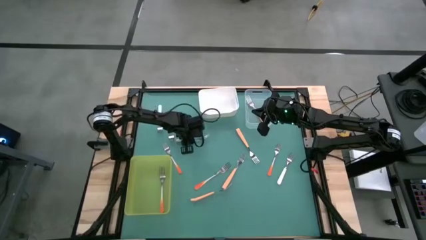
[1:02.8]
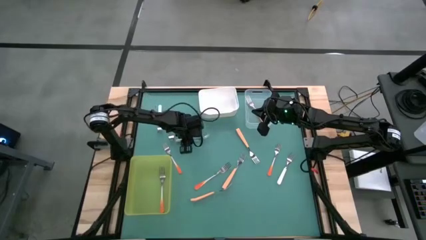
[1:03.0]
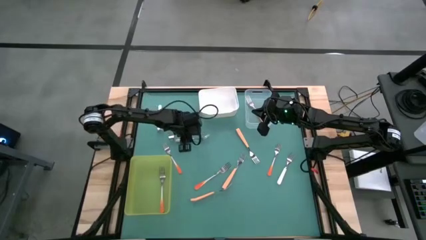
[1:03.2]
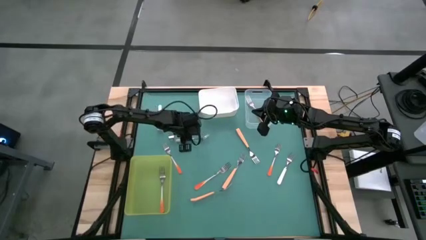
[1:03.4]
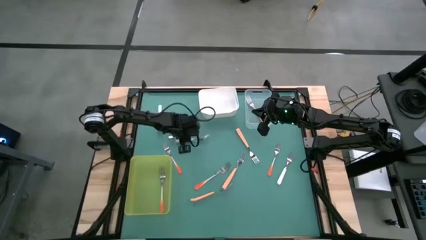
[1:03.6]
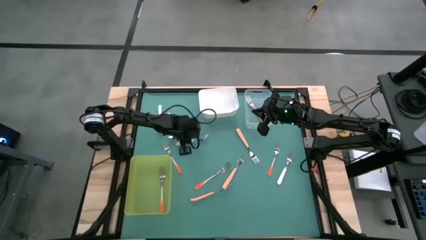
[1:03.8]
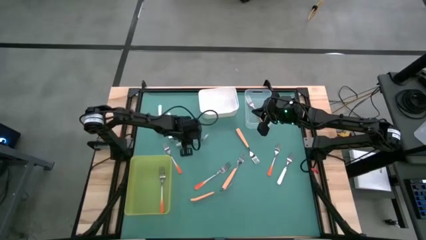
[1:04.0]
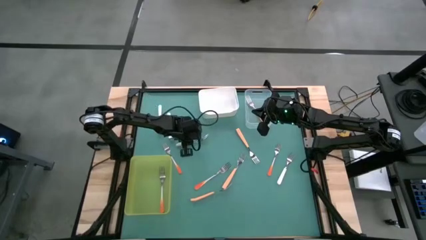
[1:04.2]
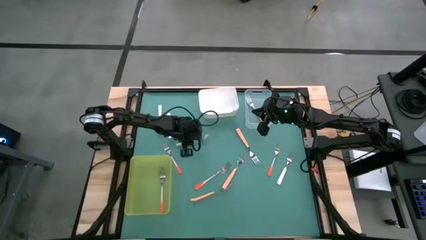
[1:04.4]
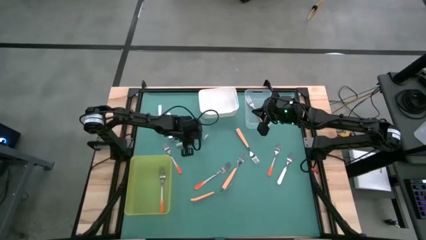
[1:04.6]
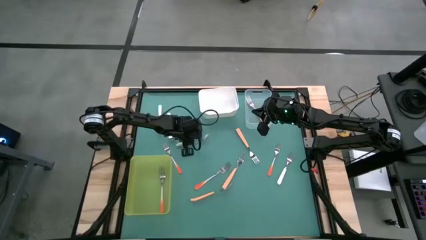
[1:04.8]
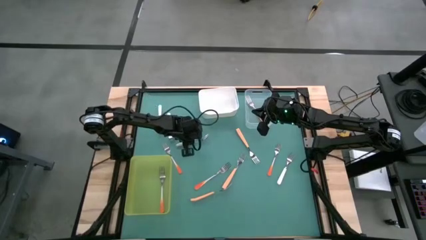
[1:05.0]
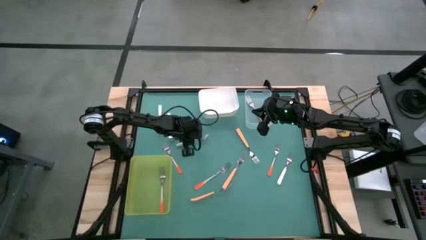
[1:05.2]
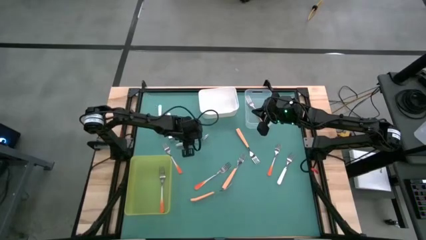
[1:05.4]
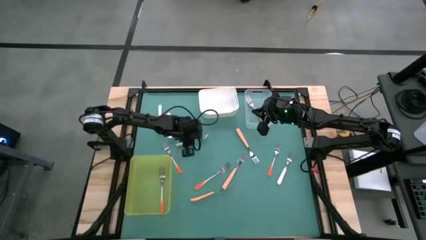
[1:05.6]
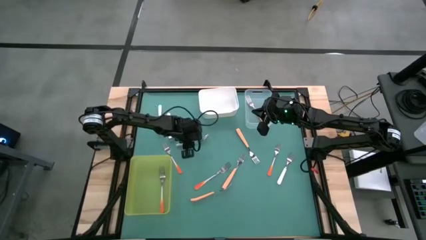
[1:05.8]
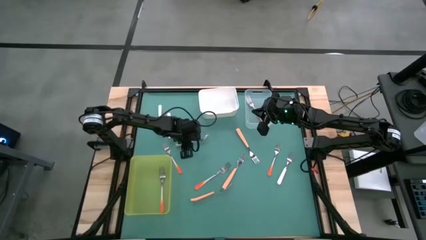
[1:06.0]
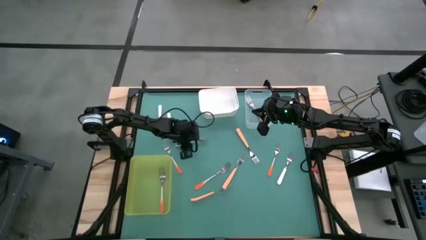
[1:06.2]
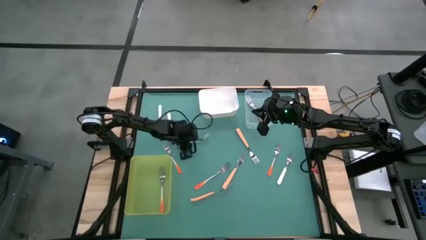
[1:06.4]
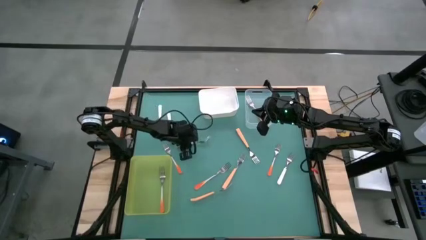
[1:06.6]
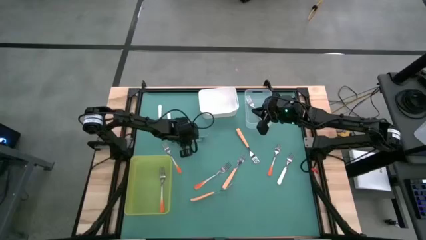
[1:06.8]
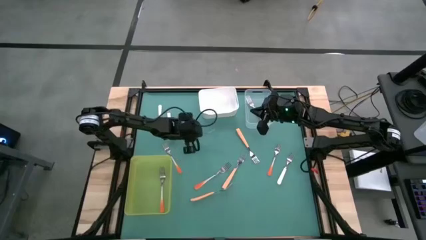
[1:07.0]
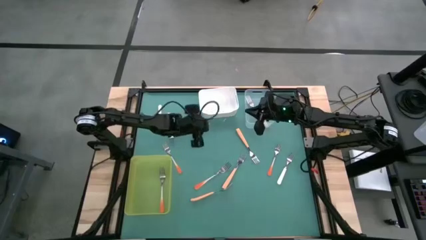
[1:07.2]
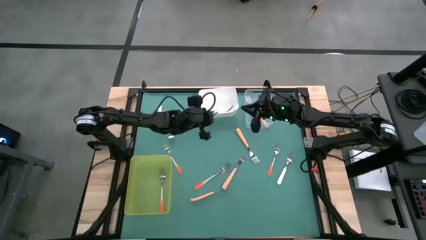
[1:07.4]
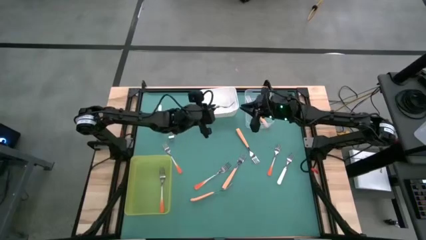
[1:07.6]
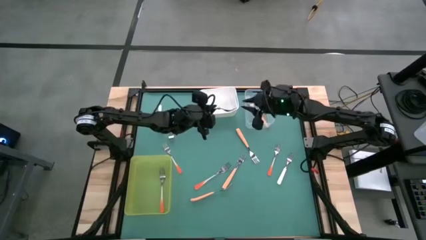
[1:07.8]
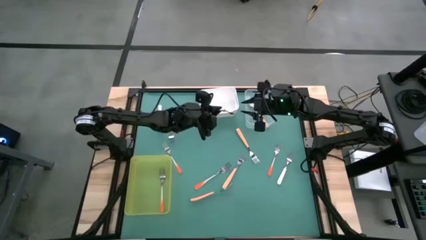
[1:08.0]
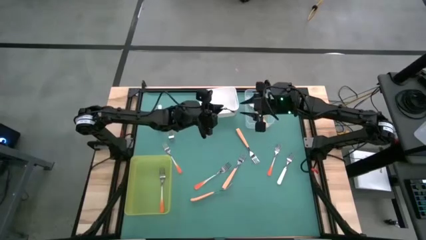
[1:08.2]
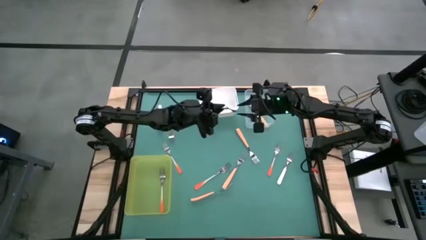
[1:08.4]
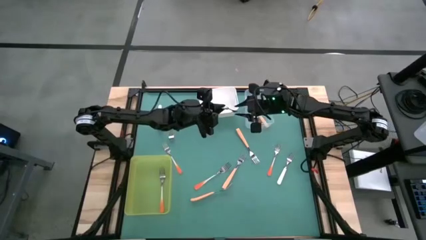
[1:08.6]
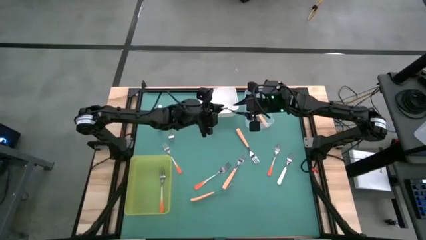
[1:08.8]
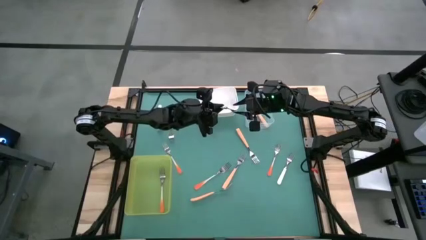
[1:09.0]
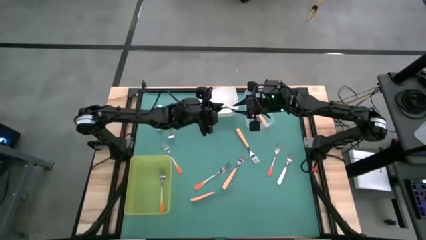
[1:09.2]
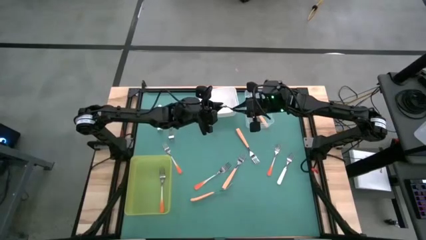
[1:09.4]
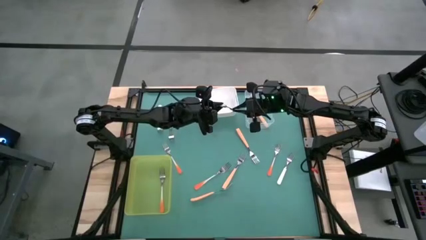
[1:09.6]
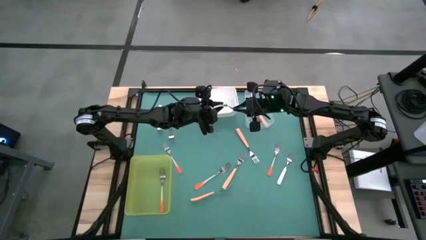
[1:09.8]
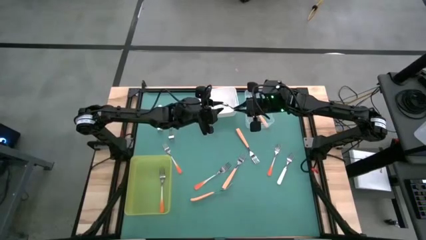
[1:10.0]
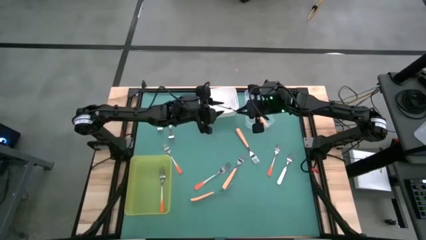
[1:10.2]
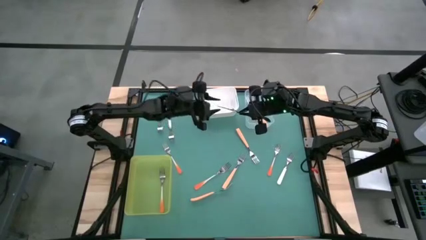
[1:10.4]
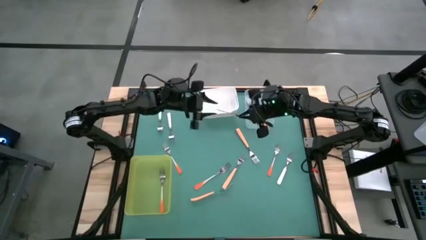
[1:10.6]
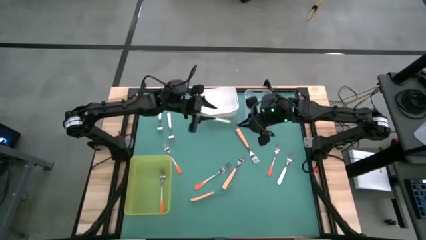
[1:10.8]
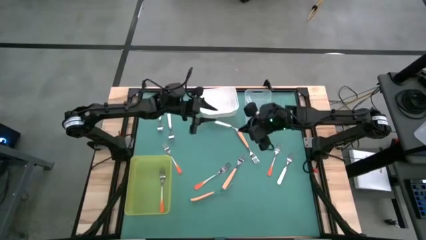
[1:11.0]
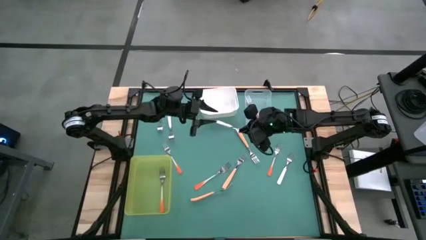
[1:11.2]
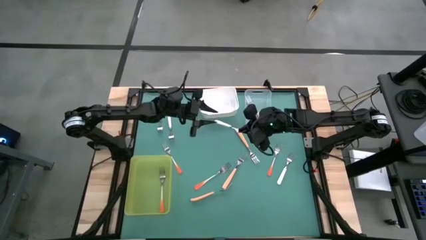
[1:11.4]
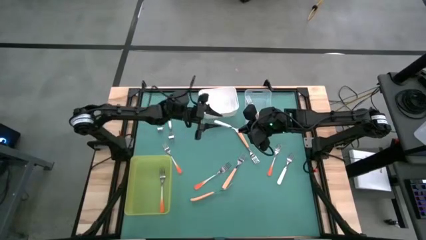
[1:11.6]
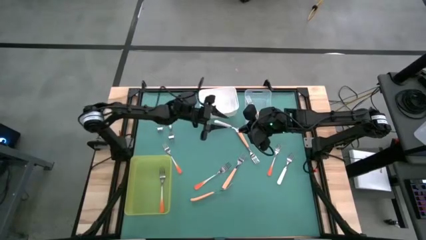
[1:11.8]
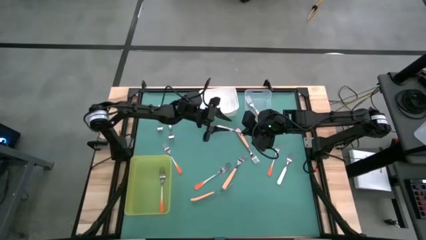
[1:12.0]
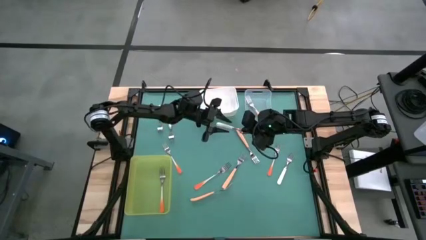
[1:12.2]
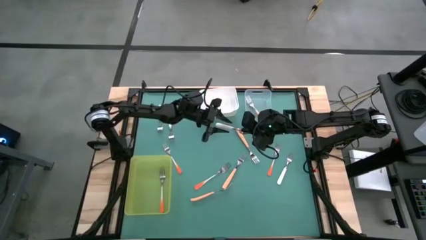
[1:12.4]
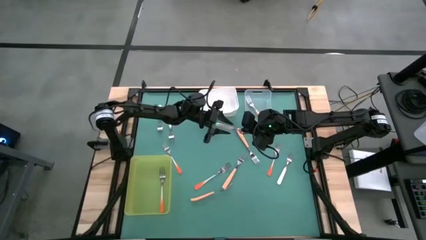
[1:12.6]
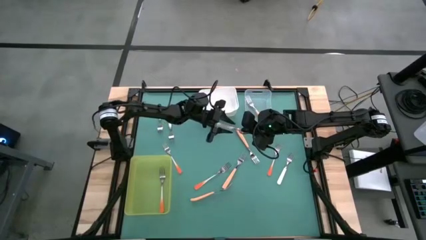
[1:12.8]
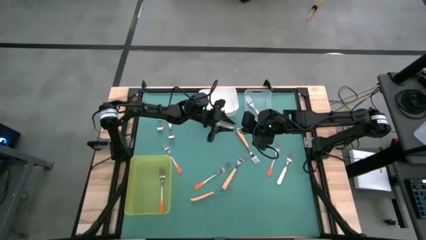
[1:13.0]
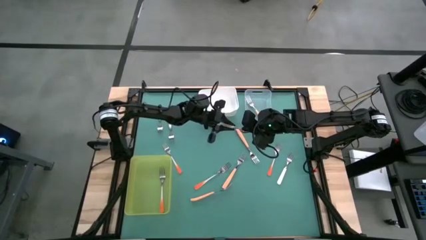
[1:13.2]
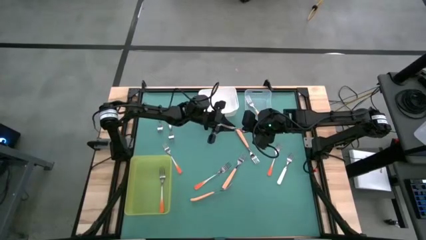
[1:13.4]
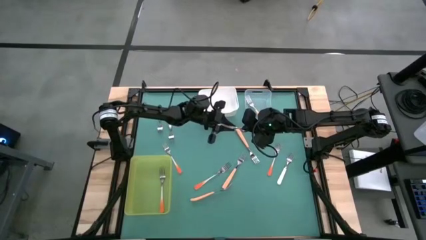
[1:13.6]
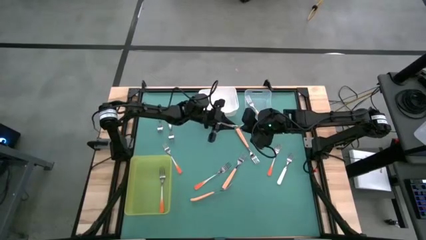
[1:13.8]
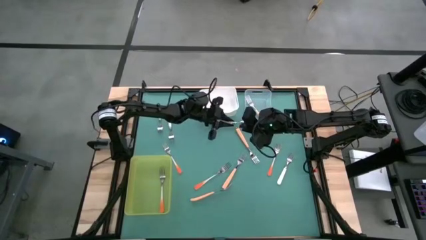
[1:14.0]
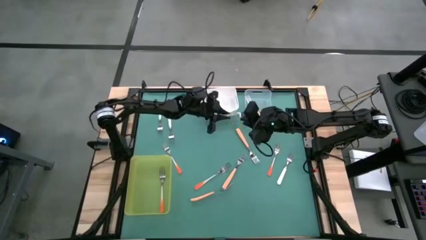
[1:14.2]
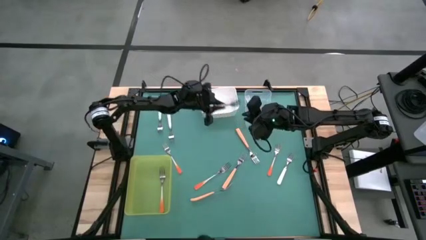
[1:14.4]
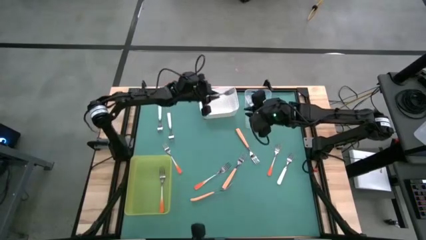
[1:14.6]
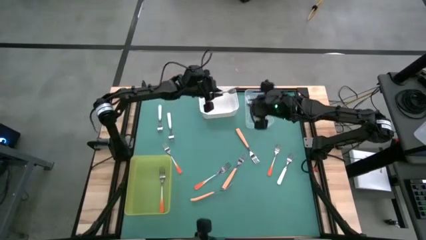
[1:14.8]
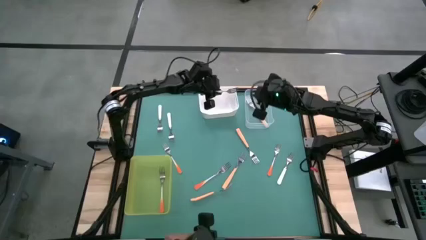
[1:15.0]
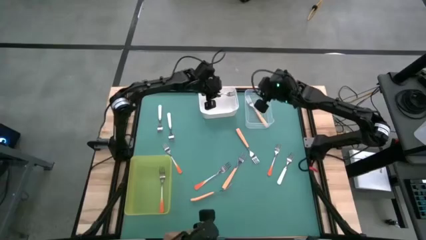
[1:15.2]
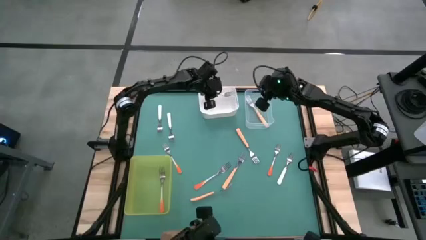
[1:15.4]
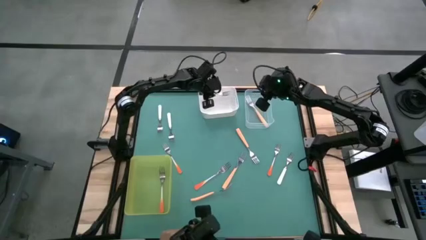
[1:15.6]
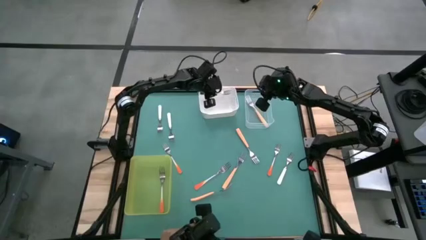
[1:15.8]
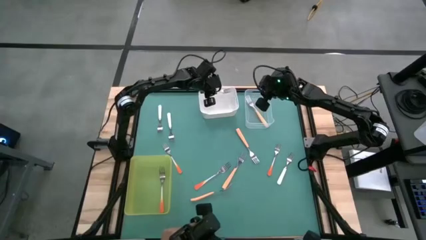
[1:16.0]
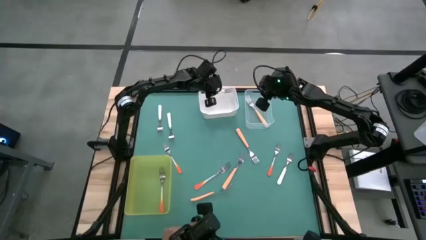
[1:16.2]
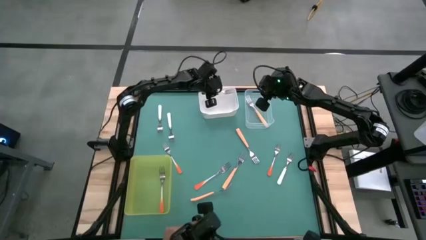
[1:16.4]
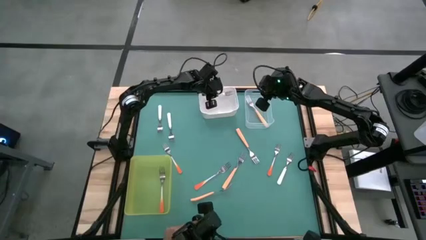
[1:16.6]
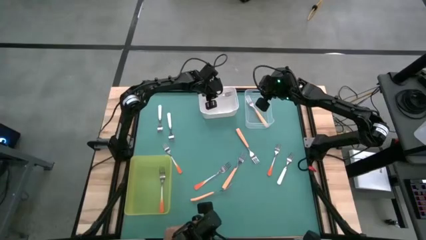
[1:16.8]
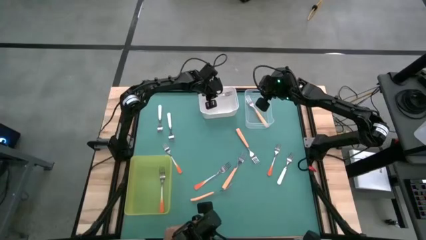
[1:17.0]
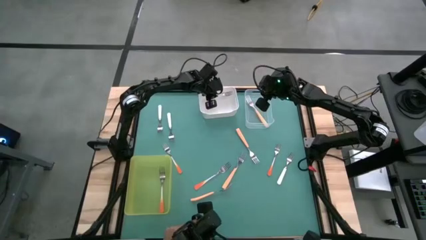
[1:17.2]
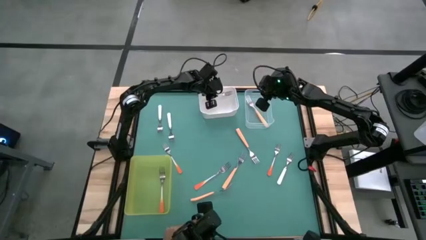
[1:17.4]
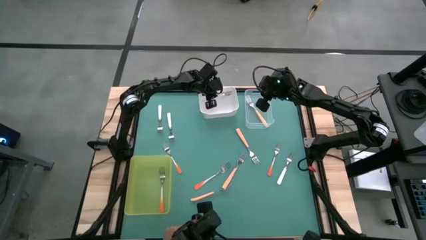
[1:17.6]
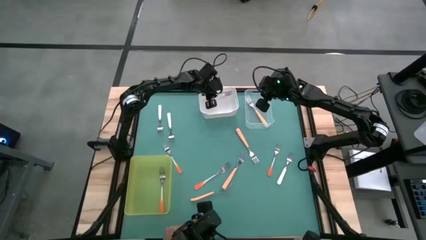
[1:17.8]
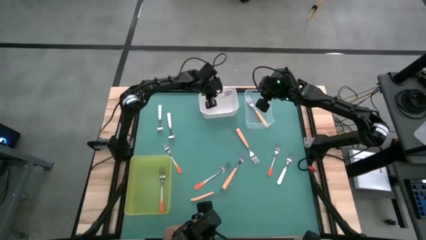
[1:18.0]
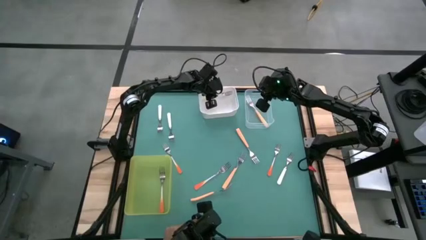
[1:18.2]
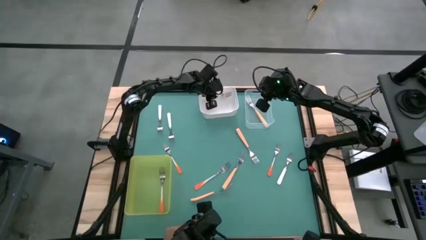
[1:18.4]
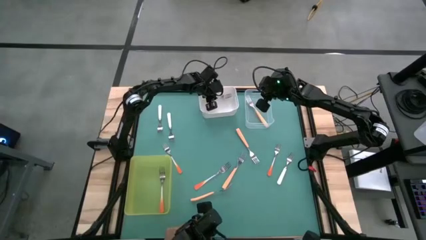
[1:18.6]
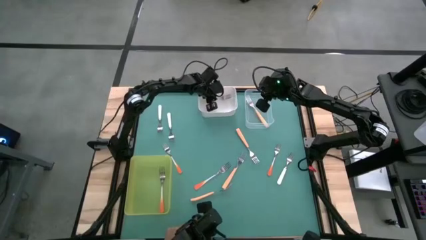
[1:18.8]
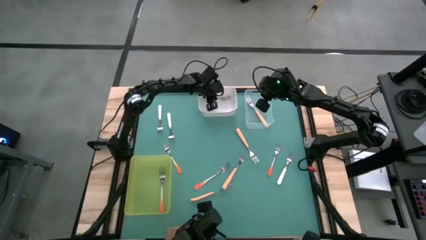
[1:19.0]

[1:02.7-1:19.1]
Task: Sort silverware by color (type)
Put the white fork into the white bin

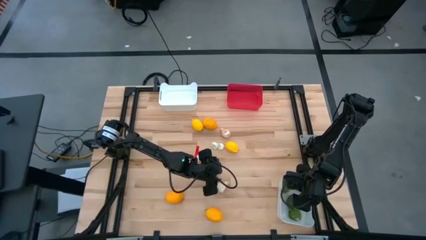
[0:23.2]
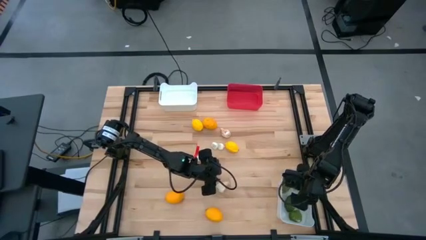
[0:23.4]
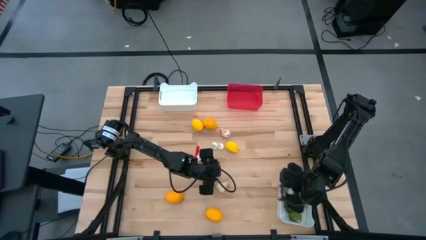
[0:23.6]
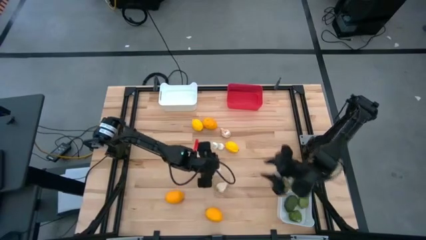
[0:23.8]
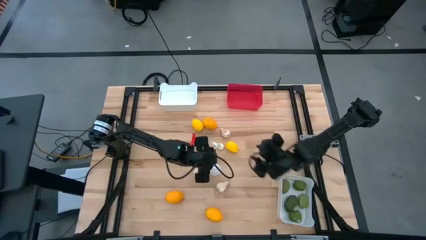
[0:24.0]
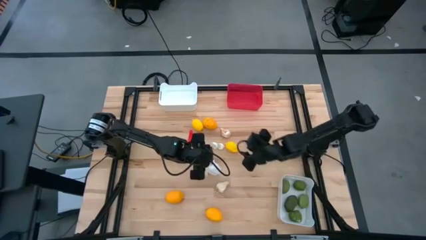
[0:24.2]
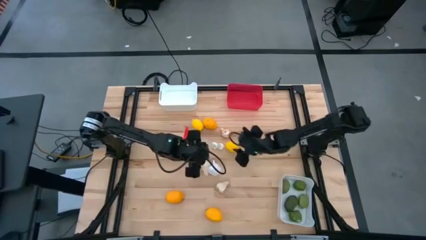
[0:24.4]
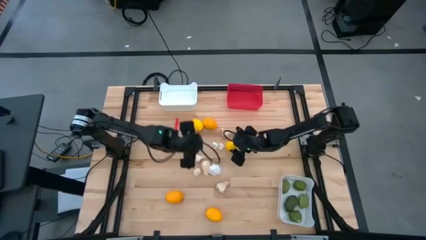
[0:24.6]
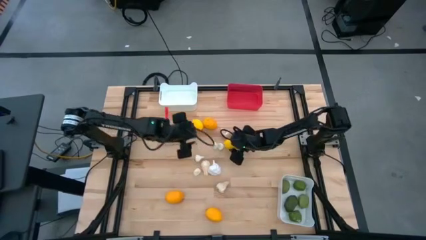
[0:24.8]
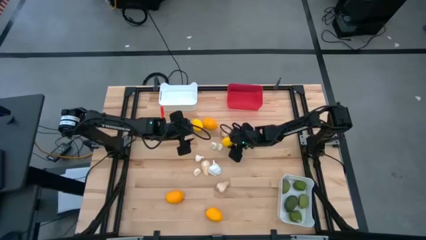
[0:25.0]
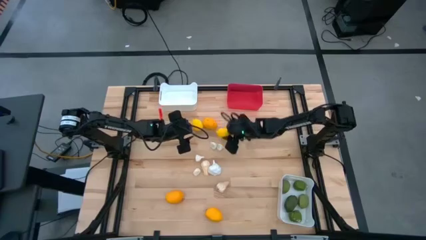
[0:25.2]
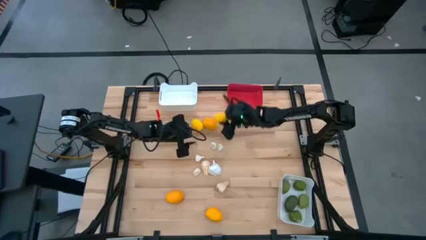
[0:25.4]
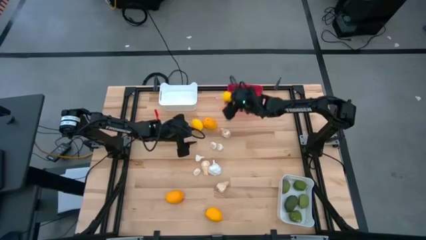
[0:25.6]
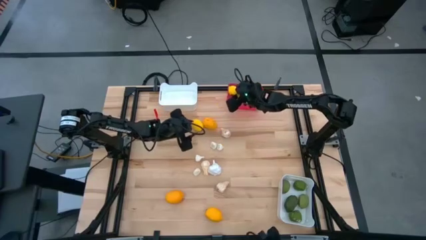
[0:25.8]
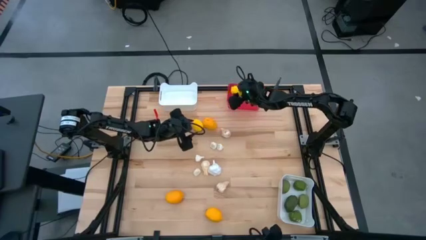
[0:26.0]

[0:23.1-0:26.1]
Task: Sort produce into baskets
Put the yellow lemon into the red bin
